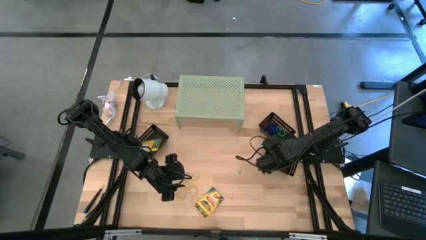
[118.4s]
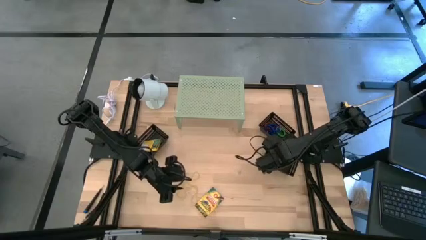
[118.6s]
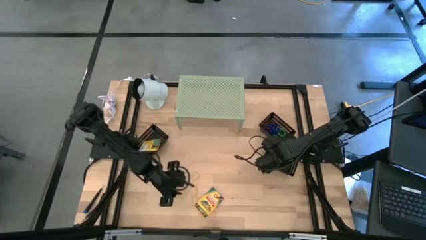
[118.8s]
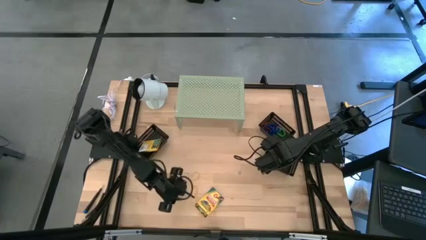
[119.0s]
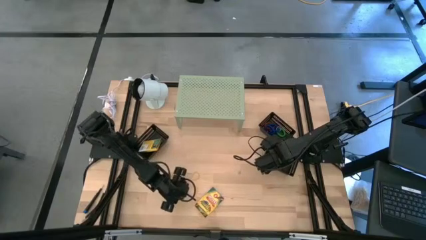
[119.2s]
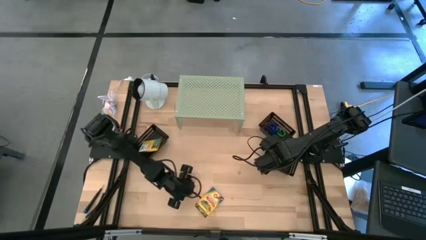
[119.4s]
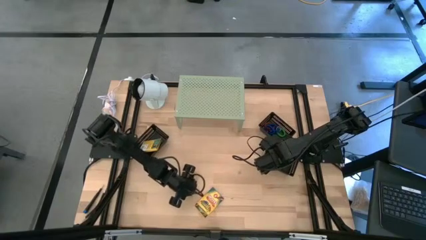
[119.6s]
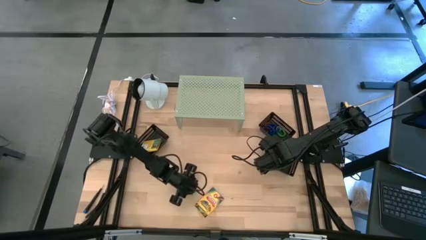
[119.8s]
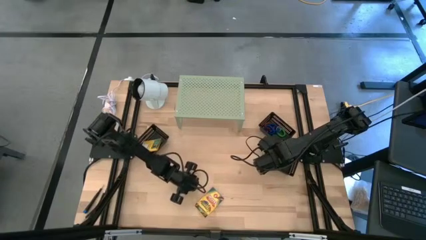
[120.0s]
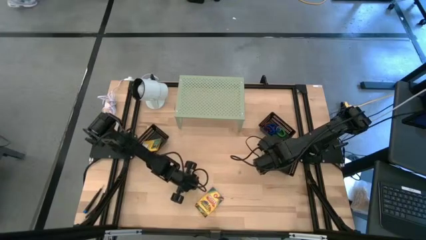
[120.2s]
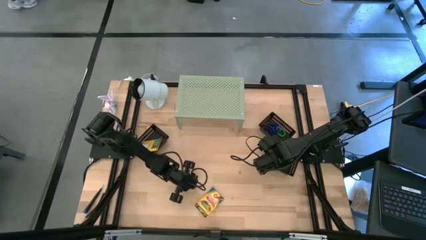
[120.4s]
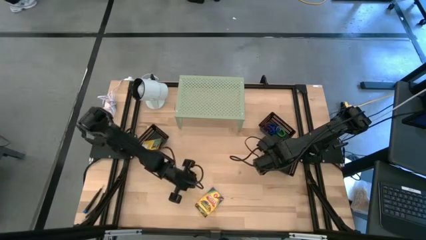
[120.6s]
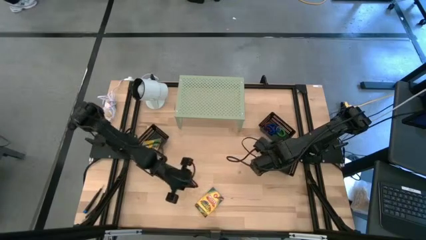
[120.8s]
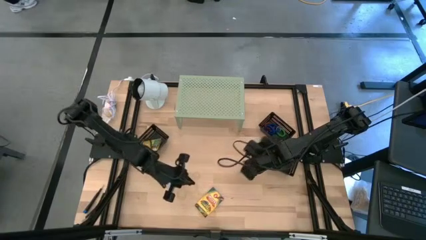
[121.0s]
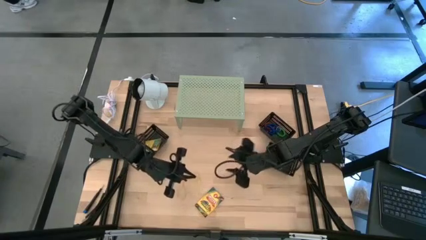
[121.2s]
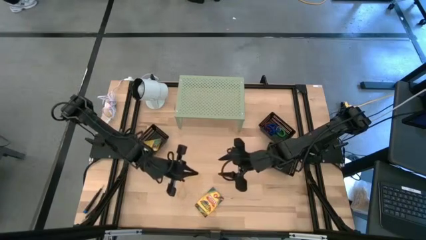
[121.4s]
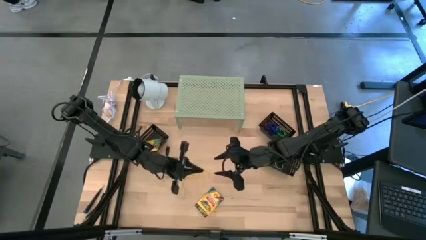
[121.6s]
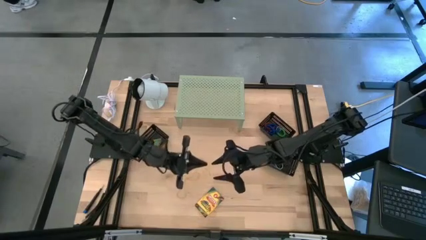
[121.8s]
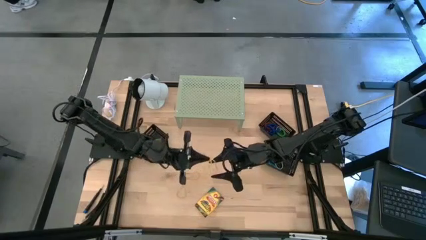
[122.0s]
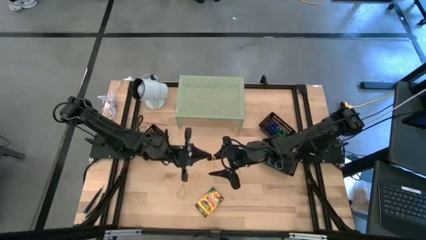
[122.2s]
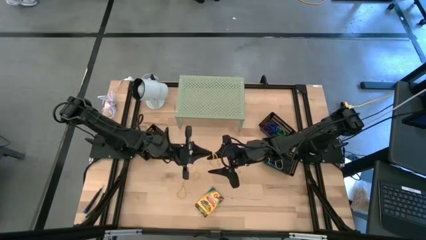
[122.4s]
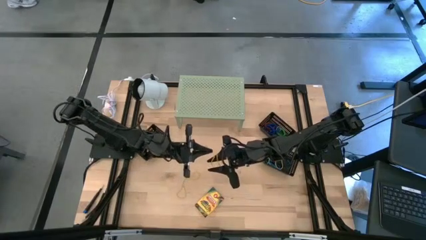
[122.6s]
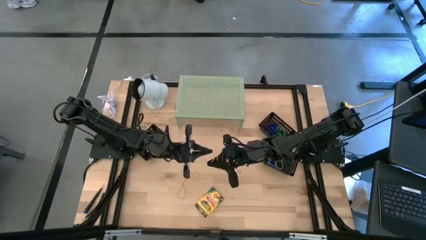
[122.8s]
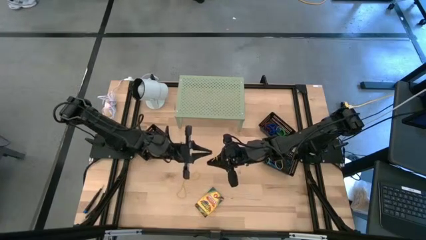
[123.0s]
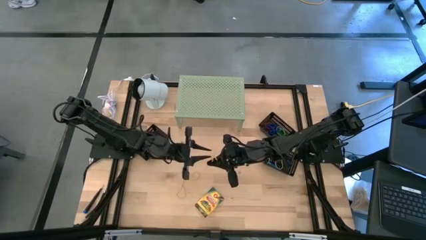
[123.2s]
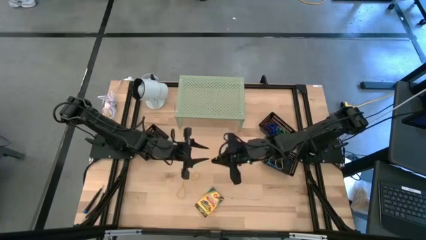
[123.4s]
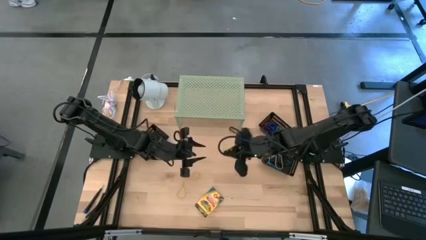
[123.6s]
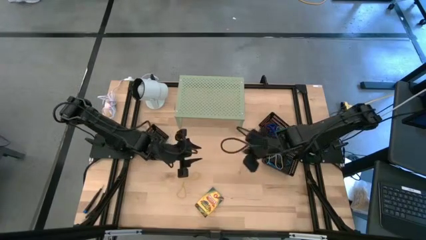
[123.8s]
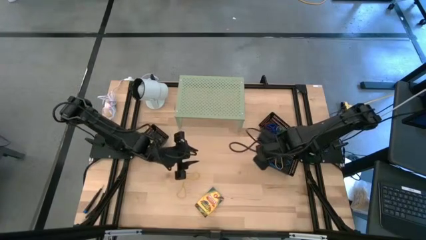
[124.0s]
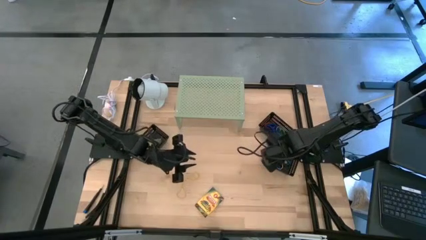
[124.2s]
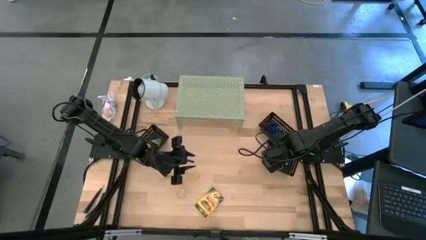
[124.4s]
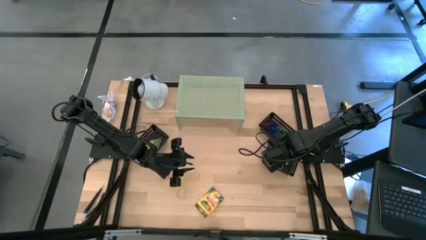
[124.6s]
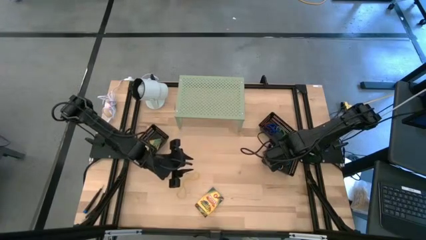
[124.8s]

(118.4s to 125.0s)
Task: Pick & Place Office Desk Supplies
Put the yellow rubber band into the bottom right black bin

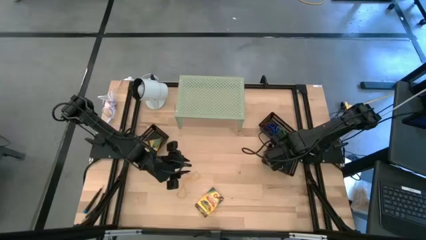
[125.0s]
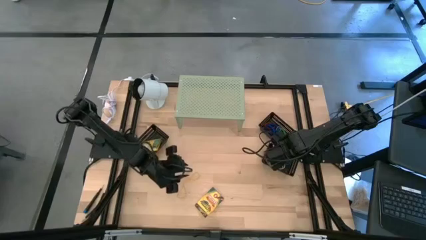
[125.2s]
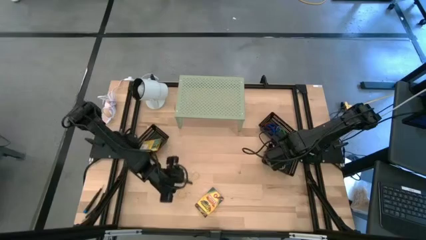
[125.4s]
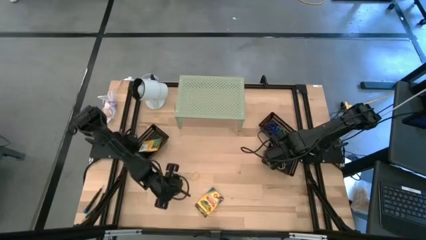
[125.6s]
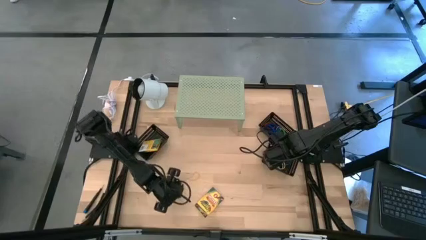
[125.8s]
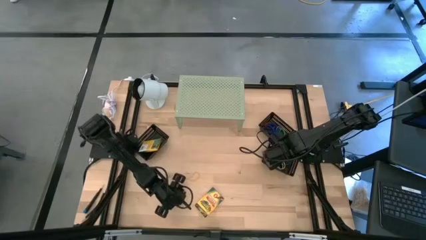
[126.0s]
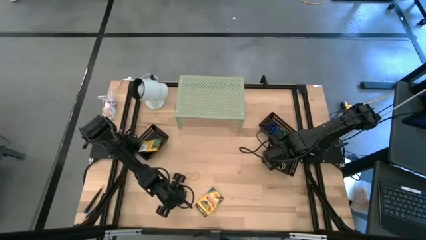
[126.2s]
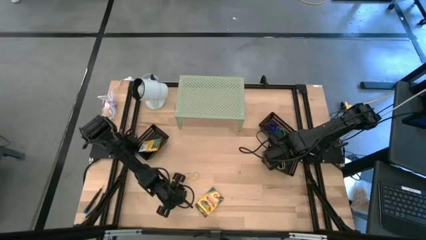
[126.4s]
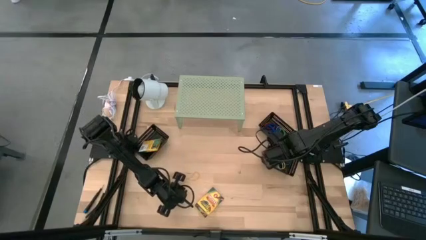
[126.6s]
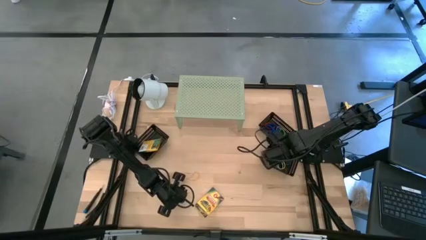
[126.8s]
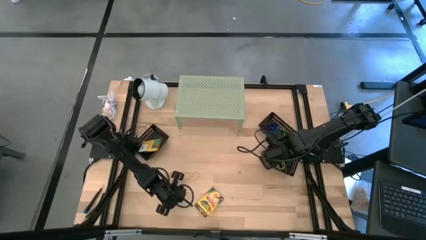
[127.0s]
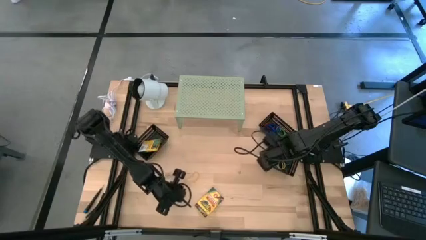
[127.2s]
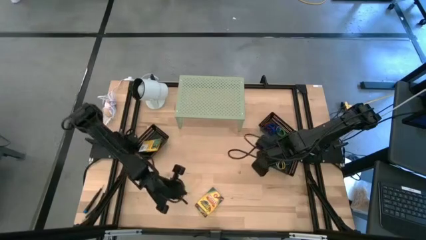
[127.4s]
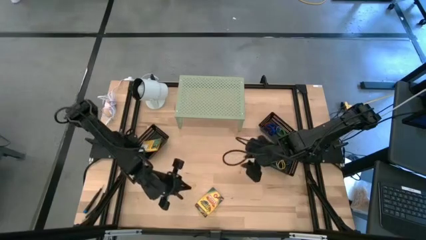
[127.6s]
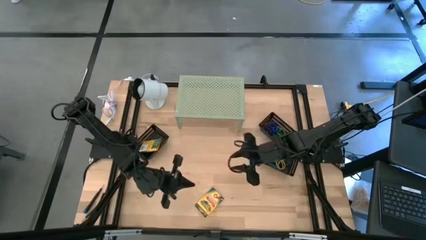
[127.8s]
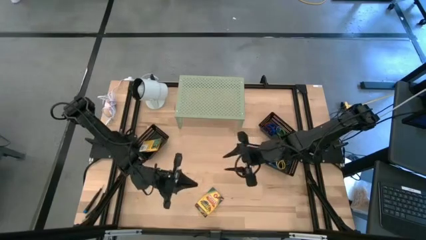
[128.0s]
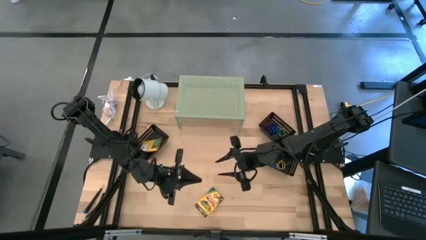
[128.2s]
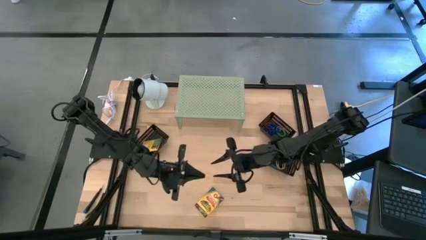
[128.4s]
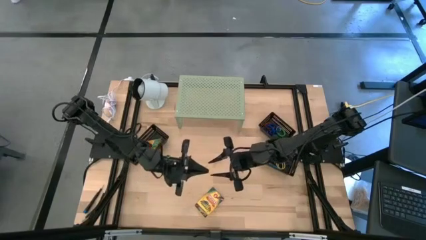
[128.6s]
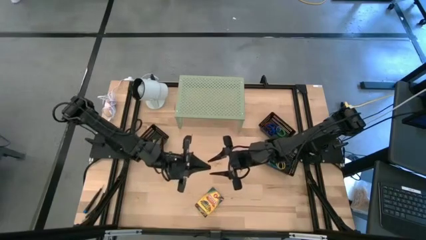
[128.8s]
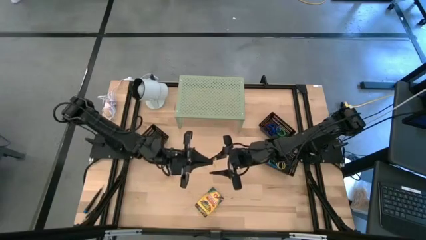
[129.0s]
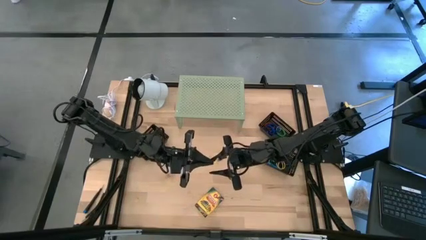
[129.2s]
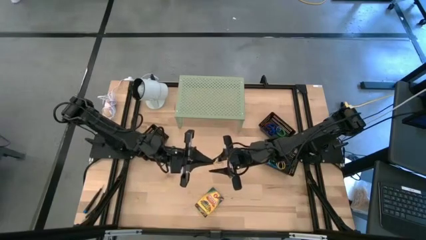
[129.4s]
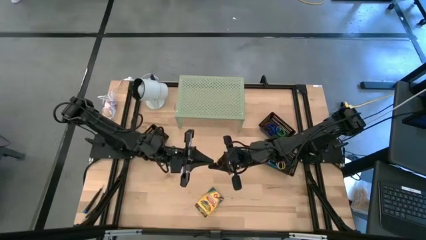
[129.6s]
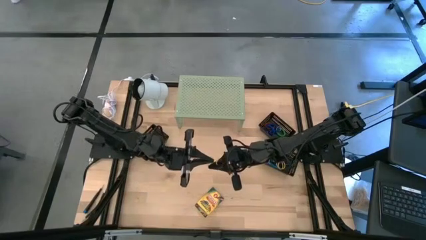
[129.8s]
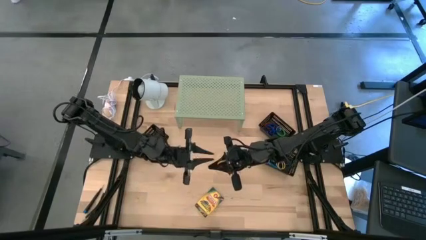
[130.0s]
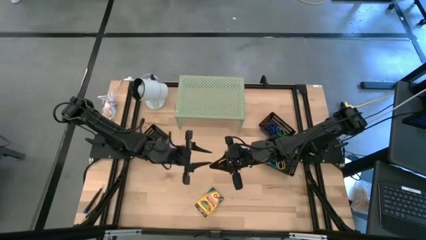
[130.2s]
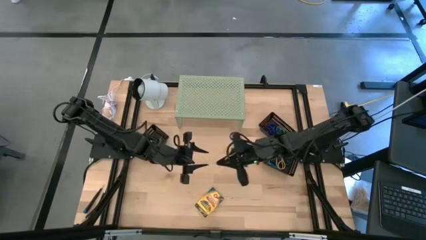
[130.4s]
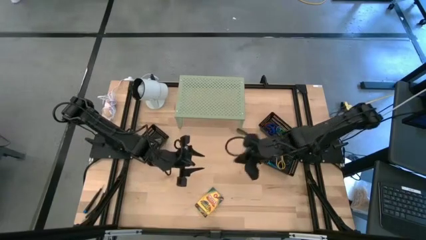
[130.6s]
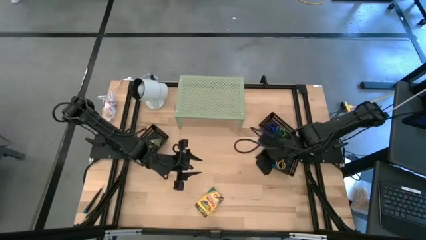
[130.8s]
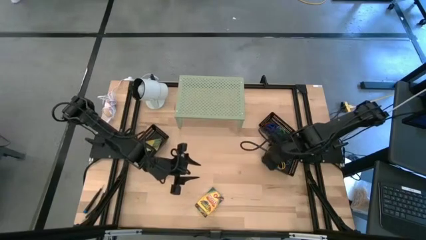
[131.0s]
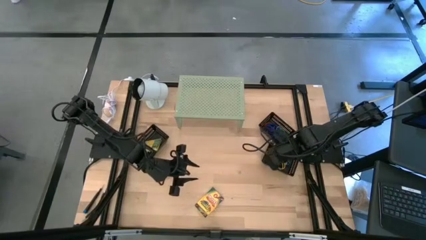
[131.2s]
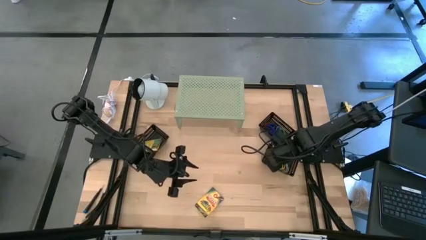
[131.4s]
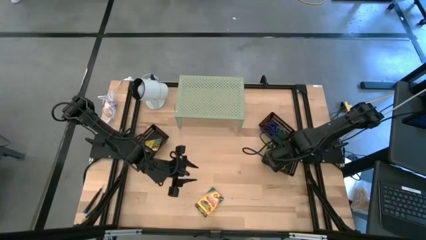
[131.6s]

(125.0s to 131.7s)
Put the yellow rubber band into the bottom right black bin

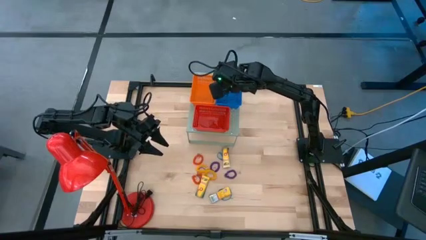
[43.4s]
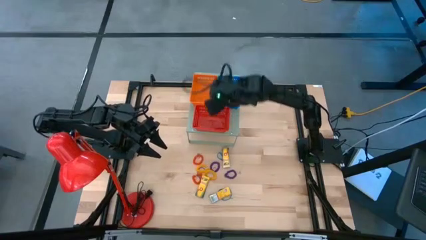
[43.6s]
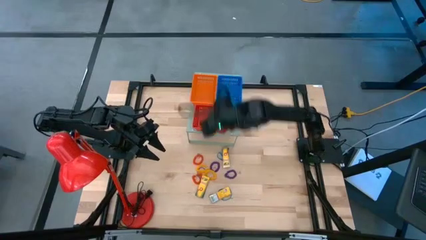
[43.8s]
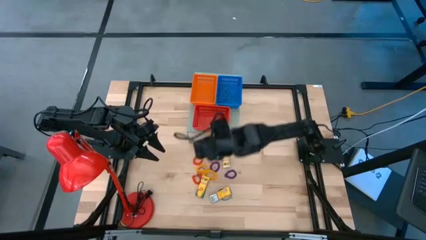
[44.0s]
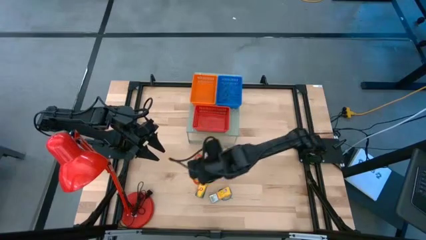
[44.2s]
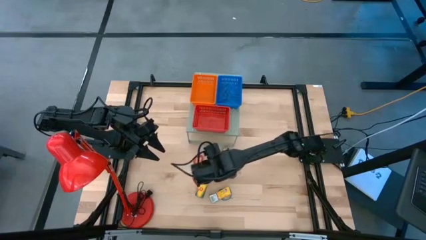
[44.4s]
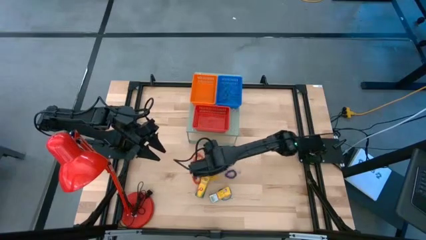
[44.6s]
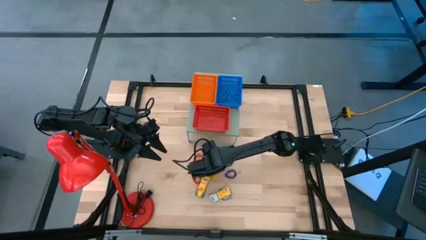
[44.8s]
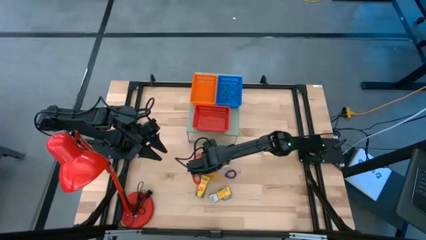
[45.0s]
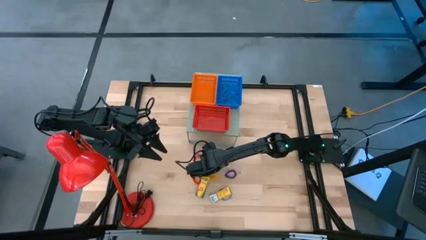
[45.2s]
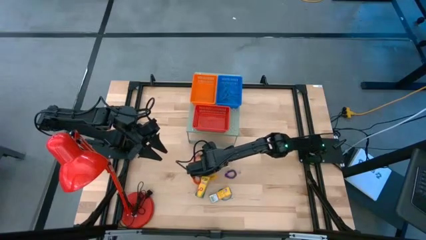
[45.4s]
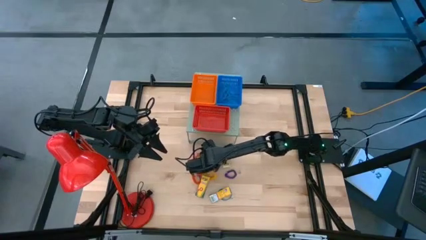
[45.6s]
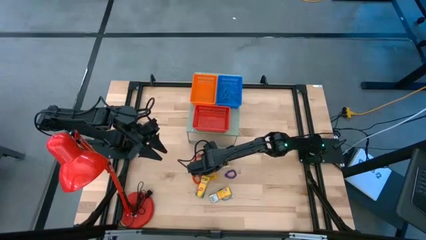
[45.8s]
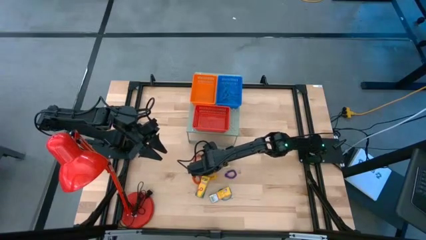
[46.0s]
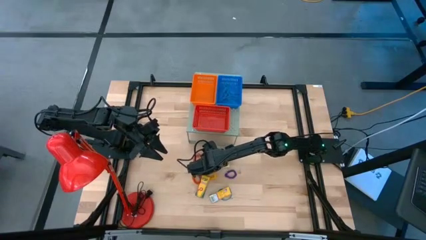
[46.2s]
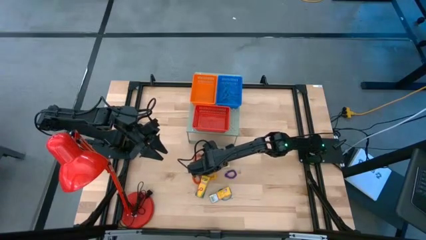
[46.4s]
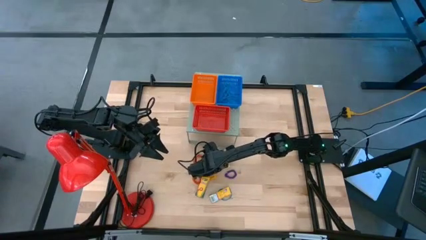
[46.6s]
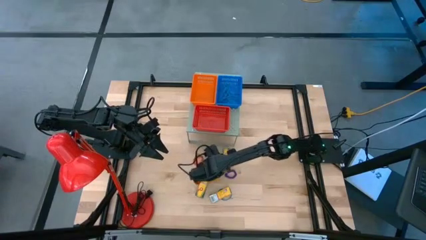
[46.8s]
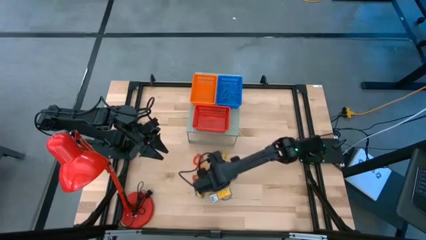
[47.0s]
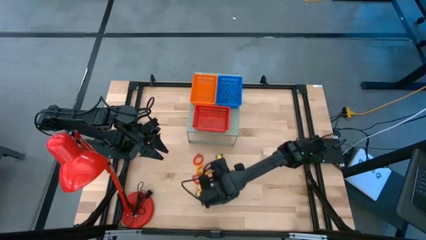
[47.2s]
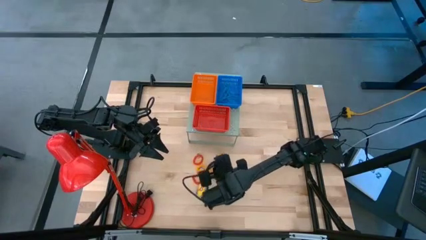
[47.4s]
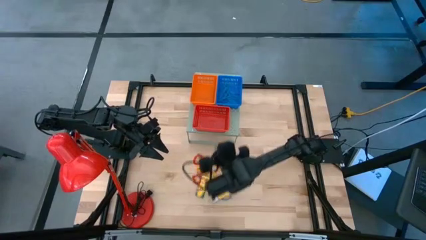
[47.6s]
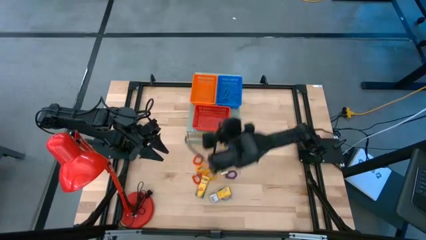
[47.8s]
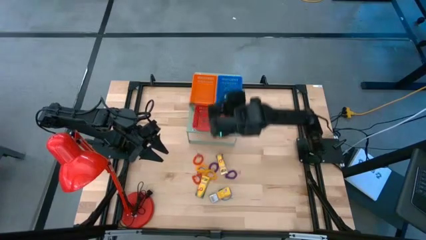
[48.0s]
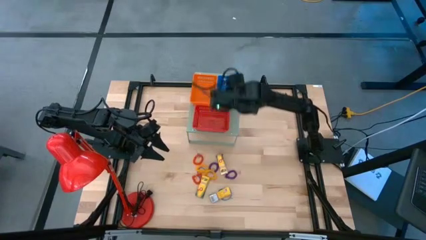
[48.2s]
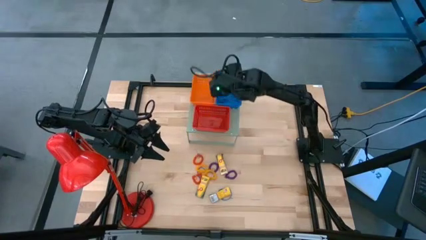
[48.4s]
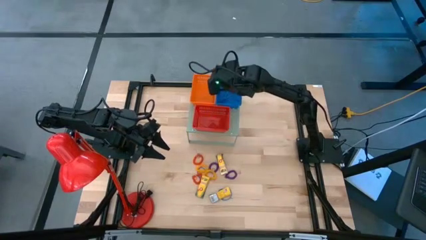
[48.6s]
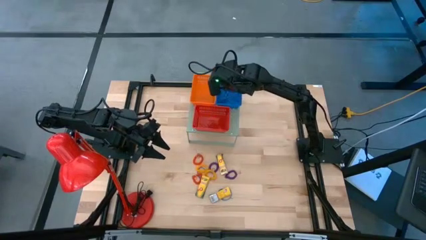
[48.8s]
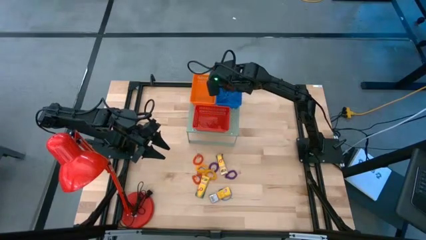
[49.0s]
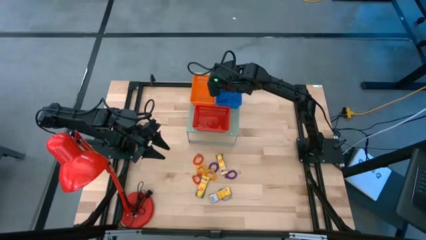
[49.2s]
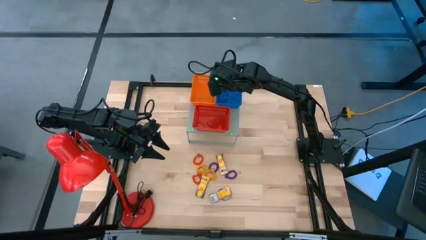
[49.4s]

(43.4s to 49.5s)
Task: Pick & Place Office Desk Supplies
Put the blue rubber band into the blue bin
